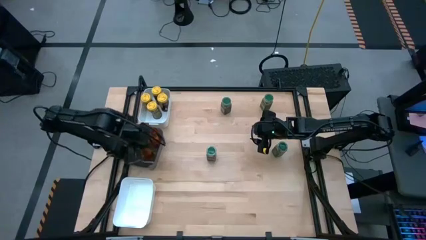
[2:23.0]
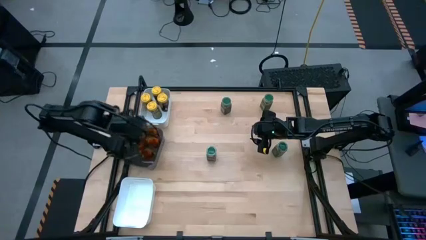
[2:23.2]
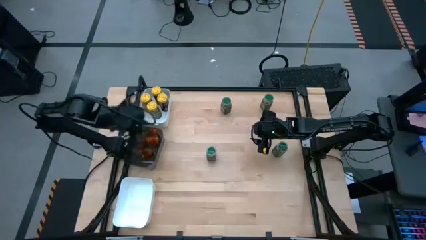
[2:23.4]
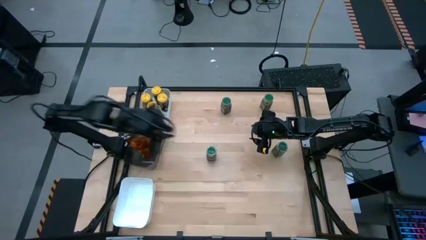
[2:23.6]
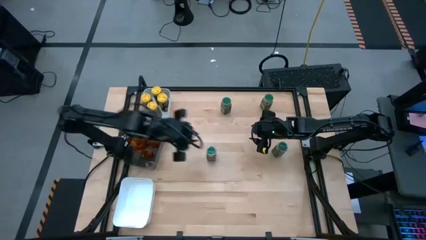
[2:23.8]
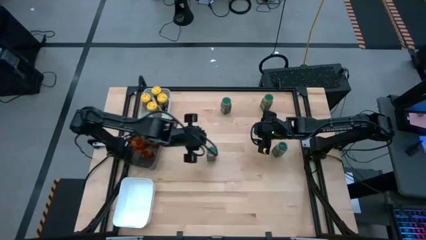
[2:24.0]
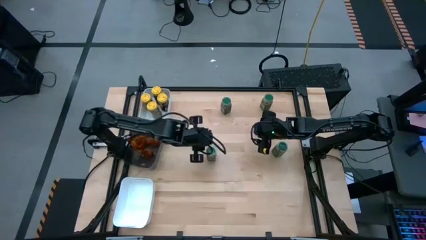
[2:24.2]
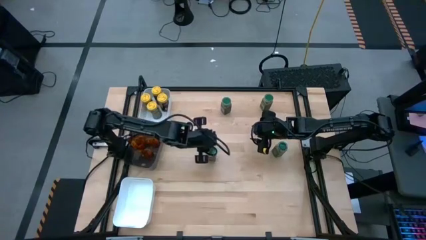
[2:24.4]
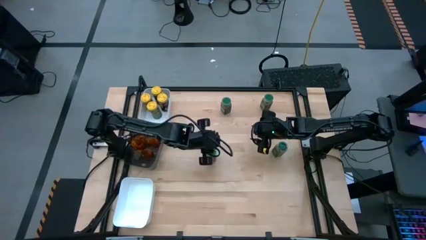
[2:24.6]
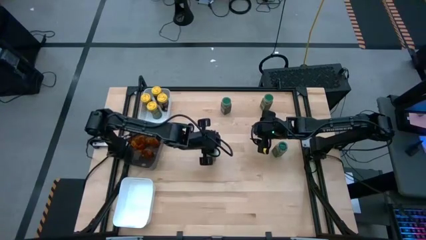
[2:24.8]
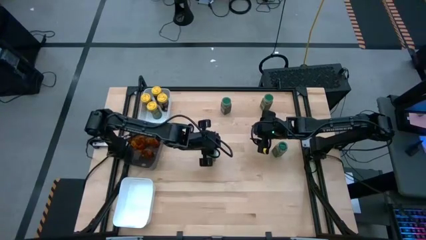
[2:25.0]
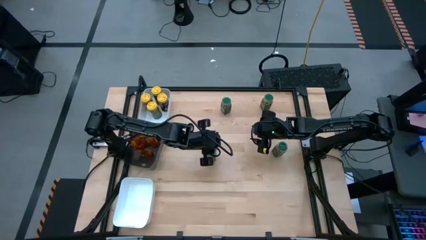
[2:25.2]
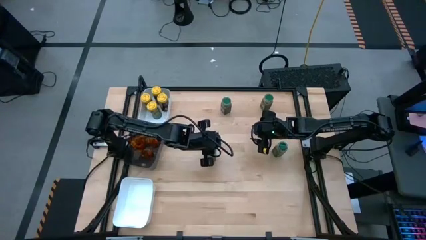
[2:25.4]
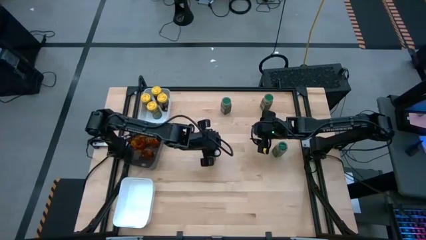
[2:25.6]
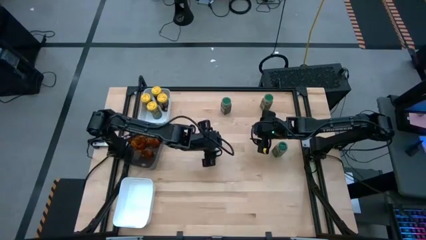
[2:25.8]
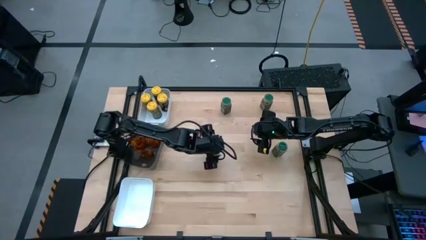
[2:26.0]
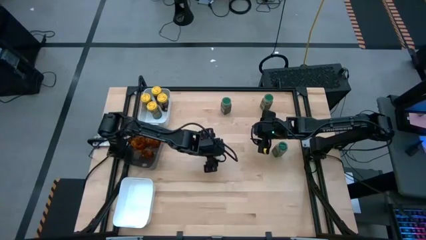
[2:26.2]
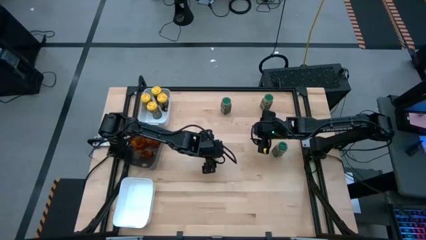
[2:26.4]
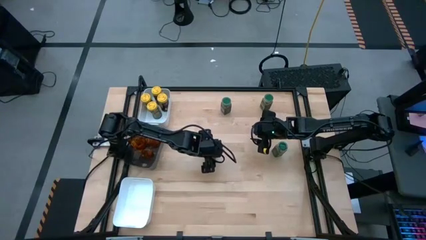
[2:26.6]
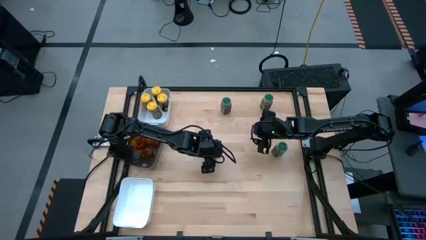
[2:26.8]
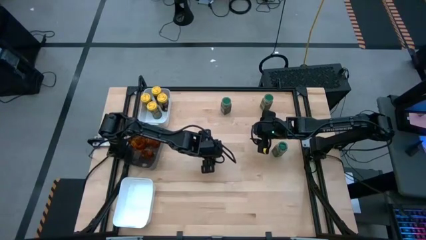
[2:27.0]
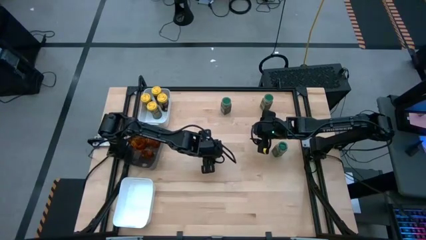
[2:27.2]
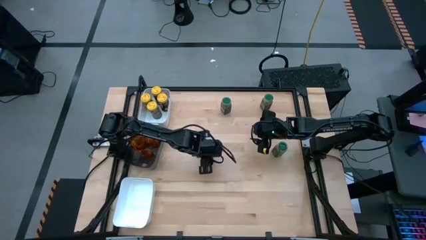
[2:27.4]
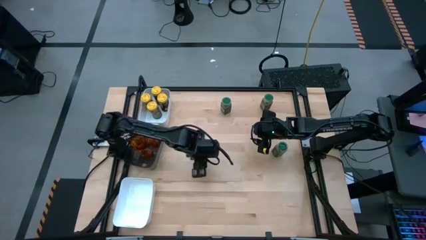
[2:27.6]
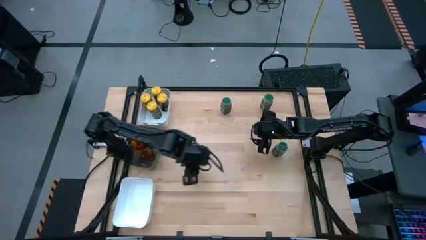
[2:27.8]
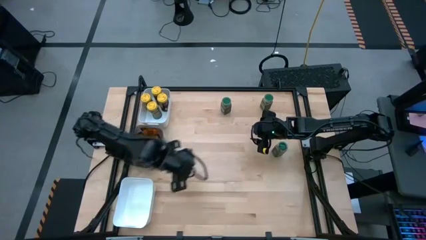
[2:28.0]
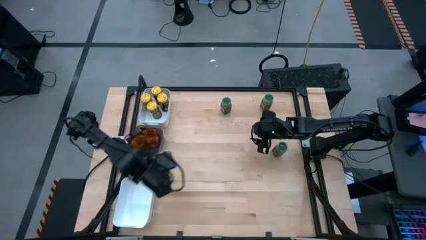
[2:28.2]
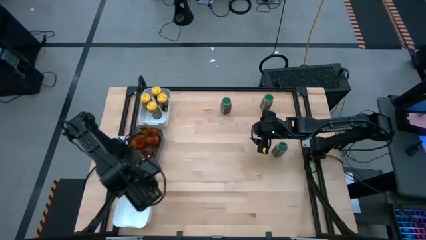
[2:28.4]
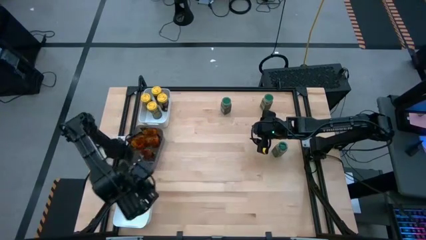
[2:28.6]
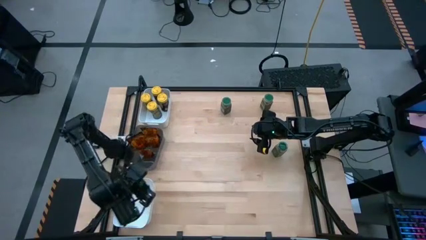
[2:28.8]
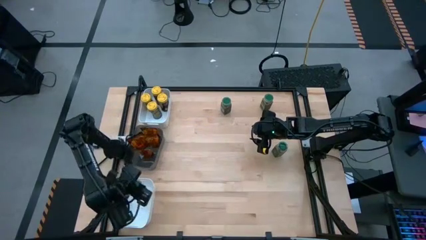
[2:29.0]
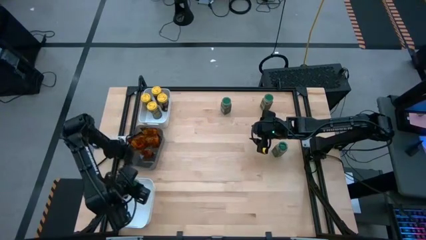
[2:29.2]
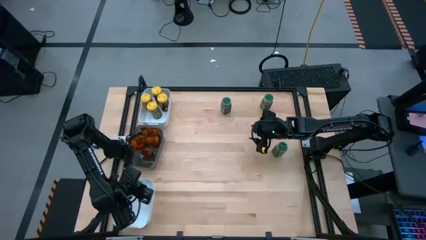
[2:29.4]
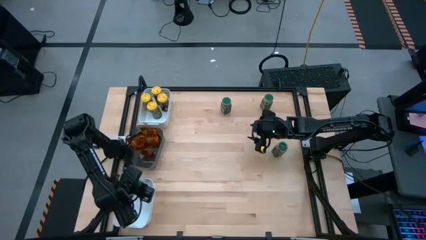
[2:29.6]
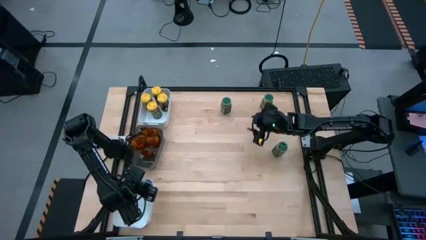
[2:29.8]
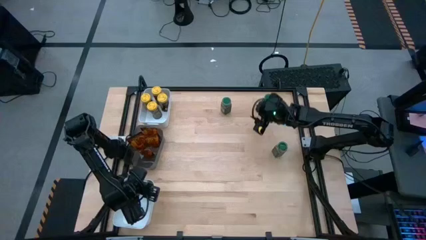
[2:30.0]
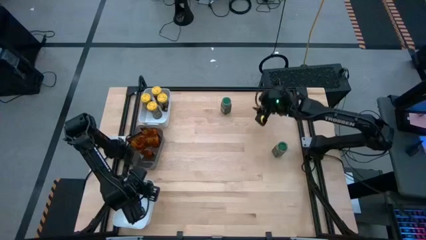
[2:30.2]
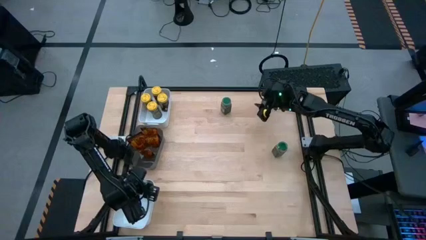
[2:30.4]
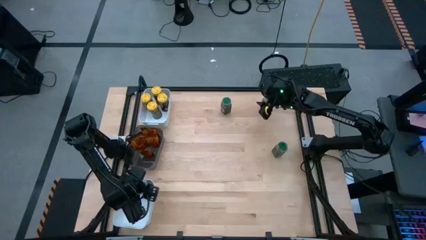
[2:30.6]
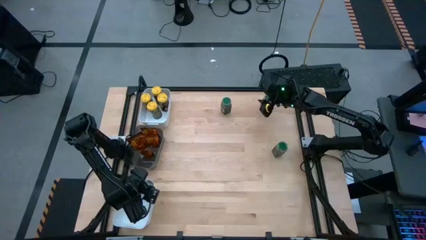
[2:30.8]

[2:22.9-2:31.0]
Task: Sort spices by type
Put the bottom left green seasoning bottle into the bottom white bin

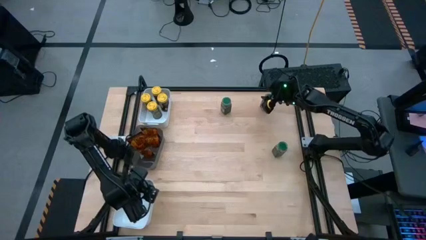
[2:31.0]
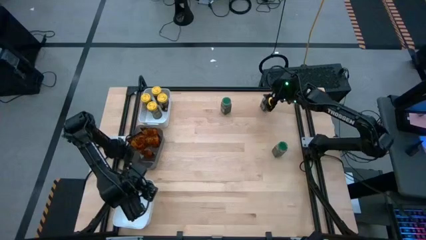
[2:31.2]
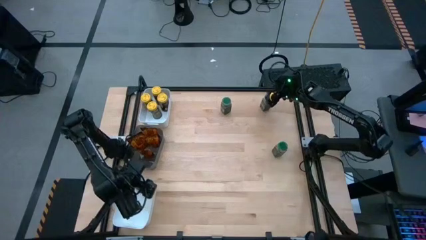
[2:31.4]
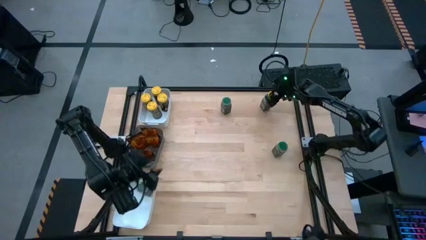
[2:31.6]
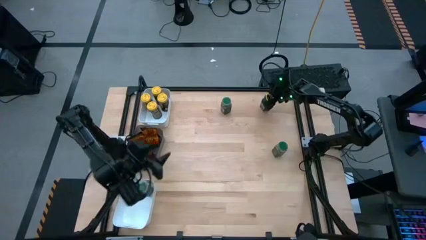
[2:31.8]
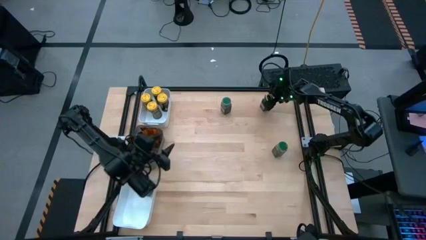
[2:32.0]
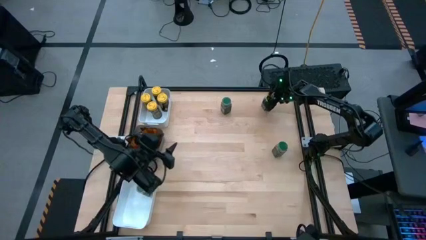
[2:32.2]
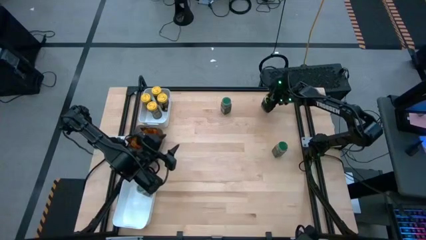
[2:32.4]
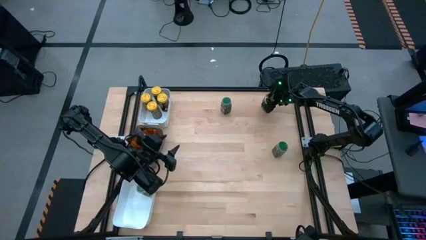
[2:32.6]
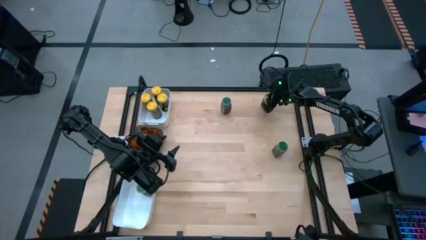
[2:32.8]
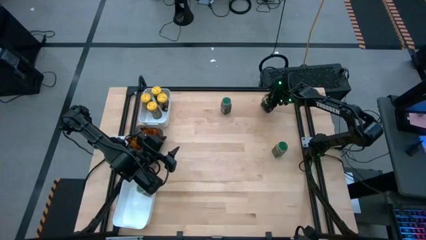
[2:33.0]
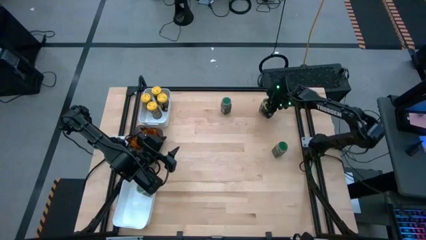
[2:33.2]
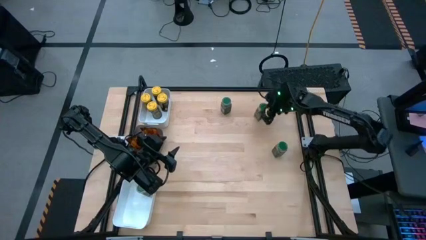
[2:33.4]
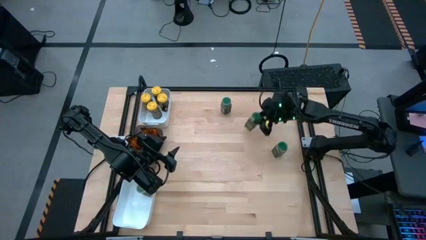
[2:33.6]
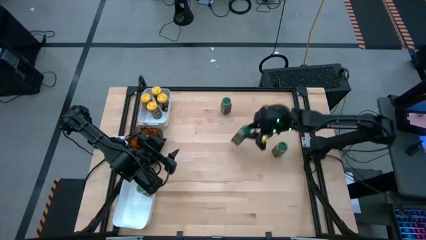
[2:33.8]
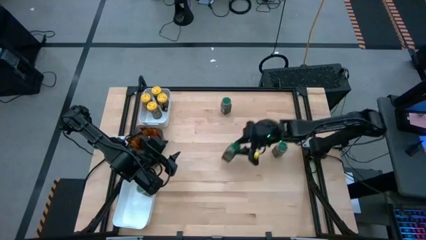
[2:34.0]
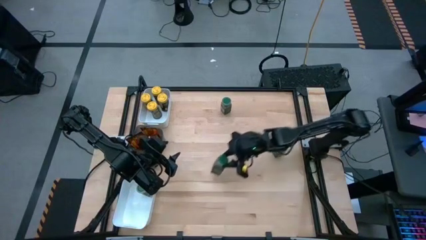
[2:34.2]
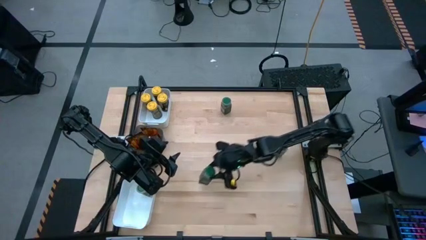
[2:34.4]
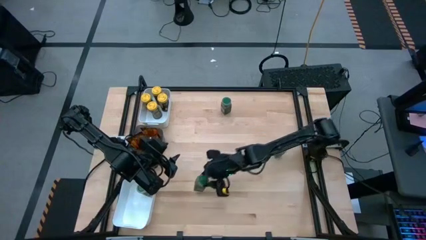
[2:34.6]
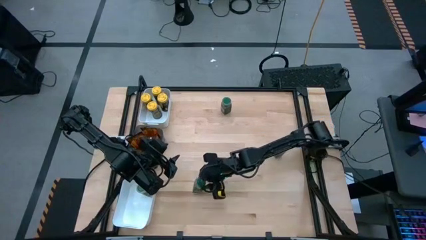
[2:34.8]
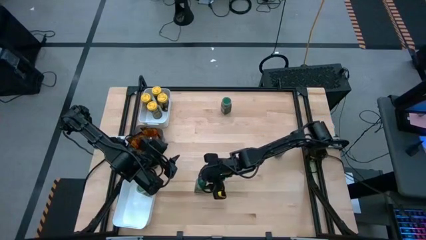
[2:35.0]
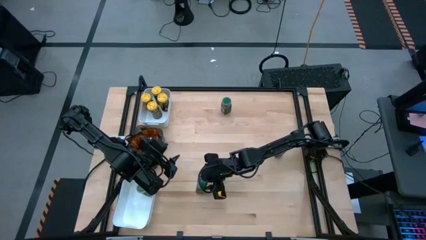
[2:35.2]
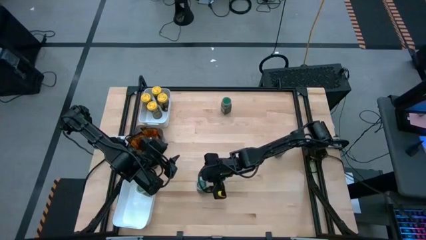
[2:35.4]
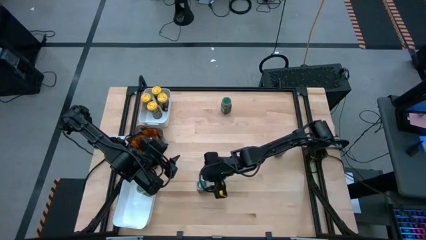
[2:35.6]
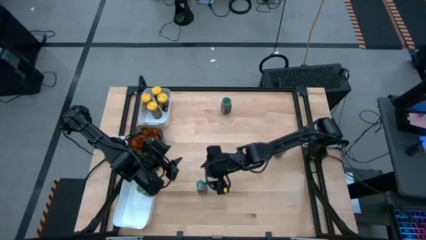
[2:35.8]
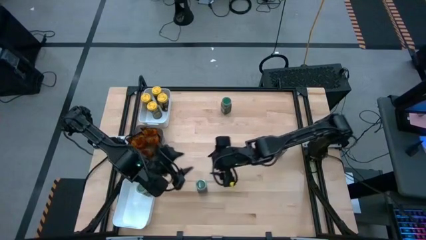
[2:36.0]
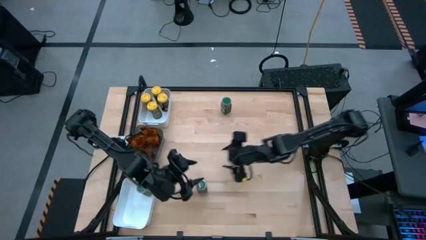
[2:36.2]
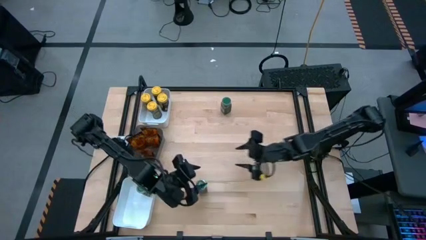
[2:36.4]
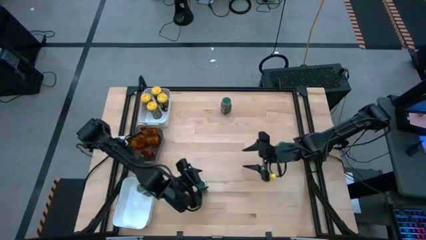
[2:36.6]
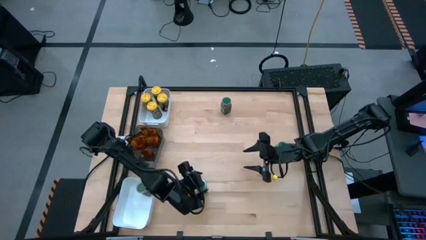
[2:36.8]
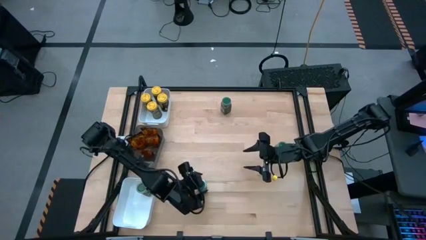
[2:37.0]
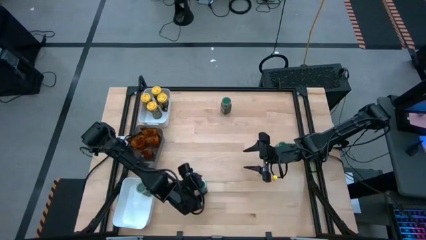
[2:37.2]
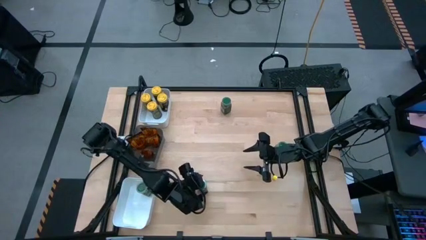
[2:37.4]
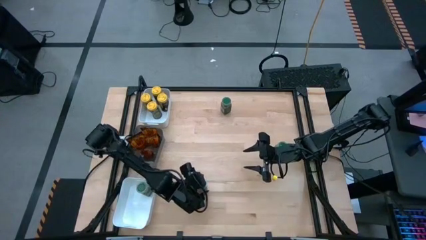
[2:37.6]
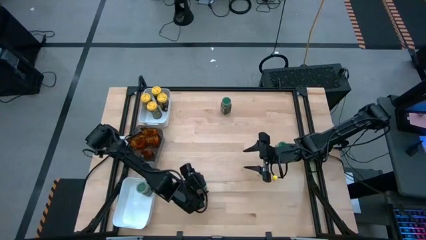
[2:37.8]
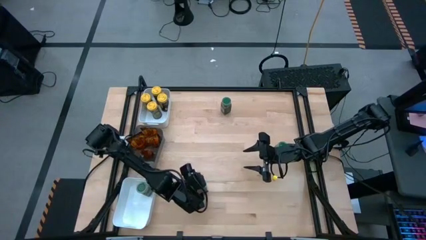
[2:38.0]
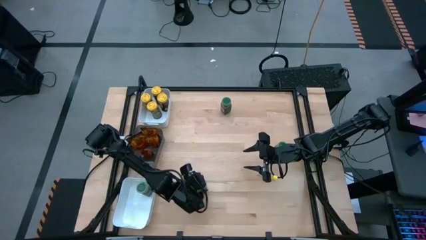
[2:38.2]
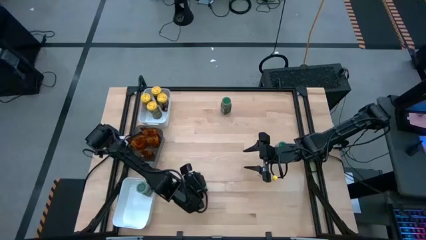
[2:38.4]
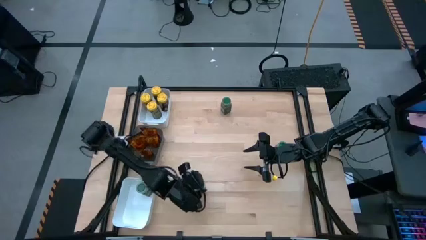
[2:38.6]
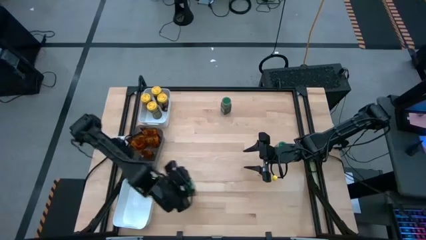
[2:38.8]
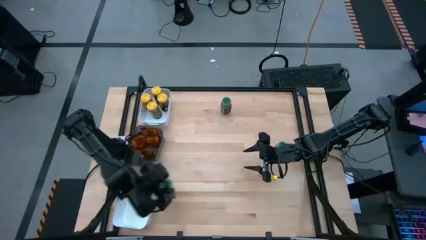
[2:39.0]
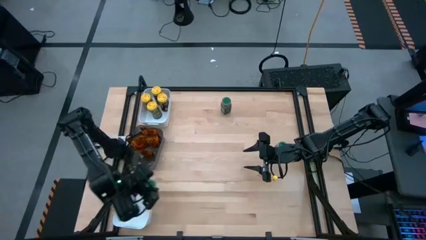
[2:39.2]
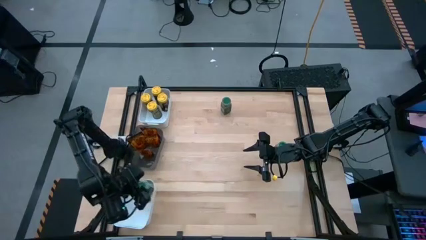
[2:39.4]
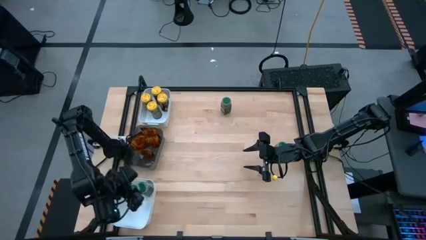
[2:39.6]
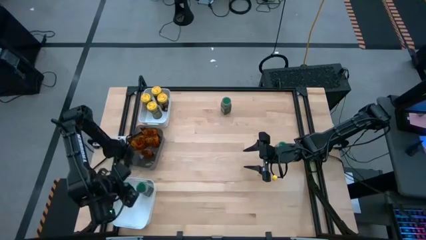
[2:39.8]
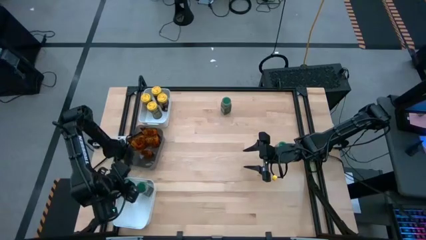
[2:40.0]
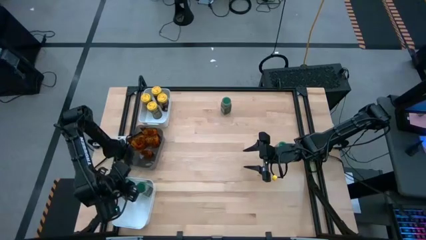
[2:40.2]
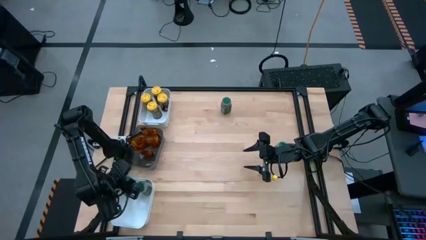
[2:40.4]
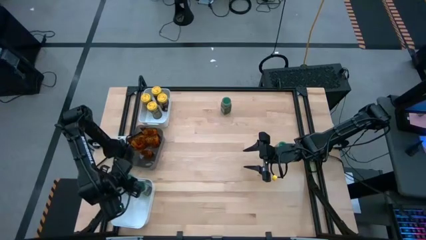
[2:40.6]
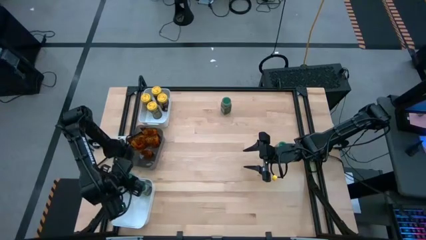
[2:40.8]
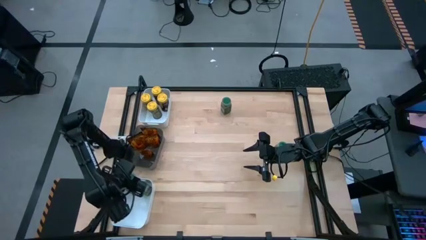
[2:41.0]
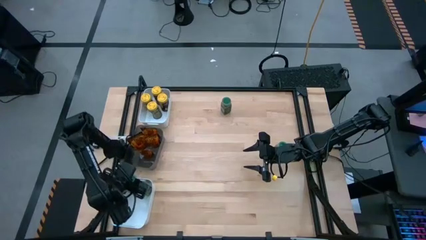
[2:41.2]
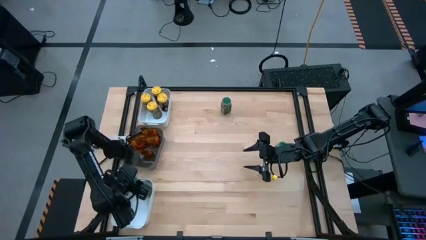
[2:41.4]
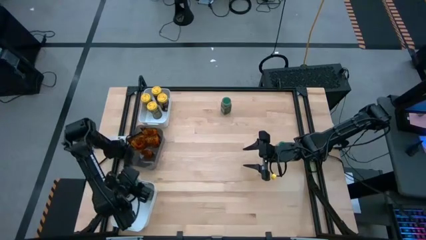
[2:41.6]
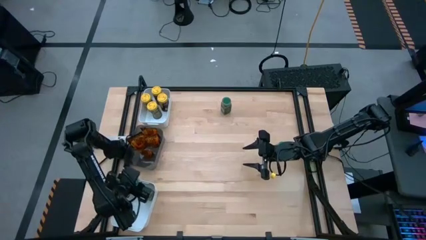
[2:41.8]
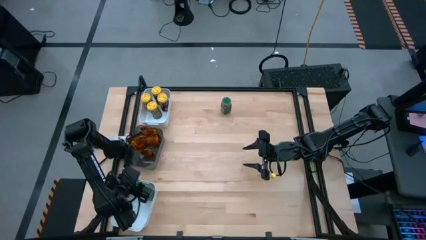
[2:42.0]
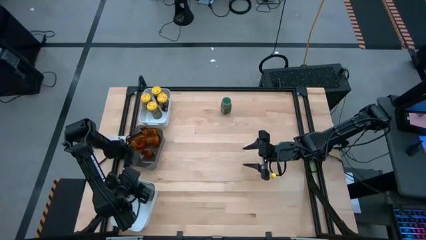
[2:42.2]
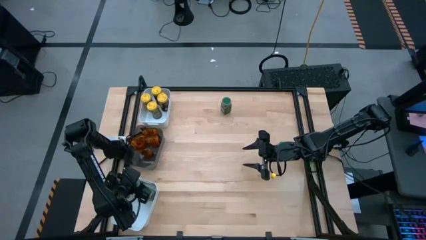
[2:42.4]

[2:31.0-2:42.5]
Put the top right green seasoning bottle into the bottom white bin
